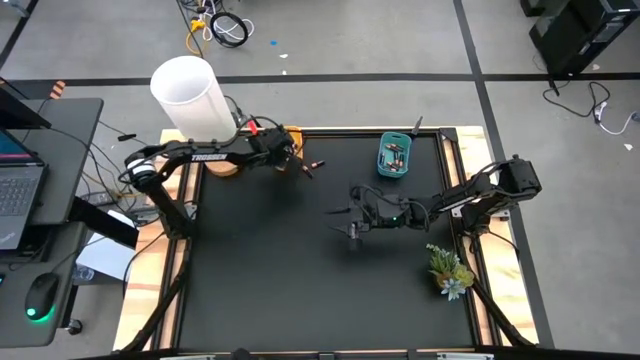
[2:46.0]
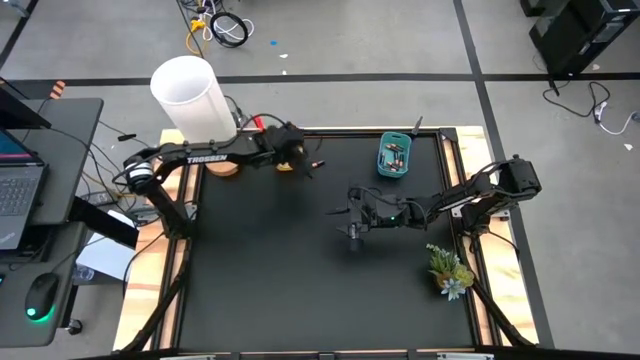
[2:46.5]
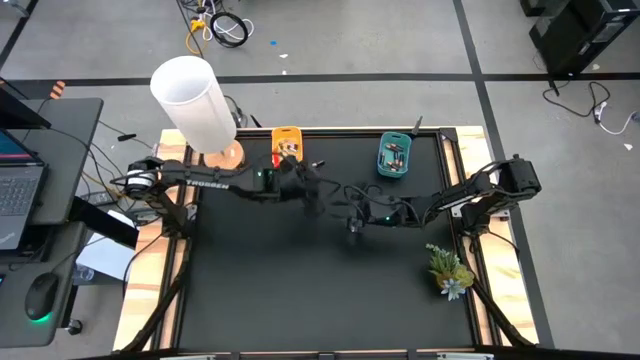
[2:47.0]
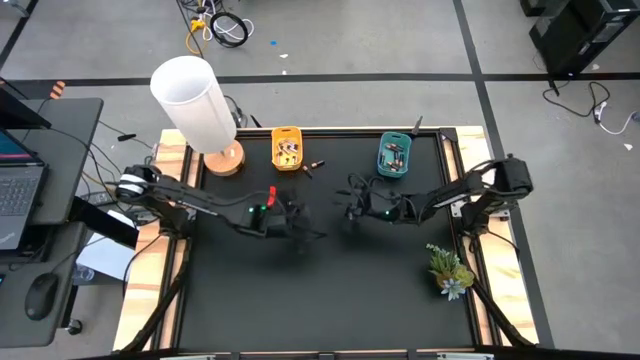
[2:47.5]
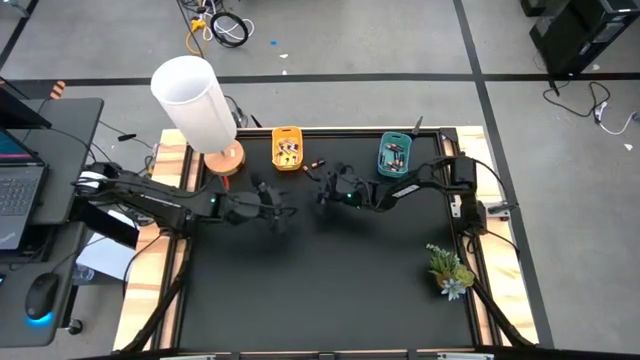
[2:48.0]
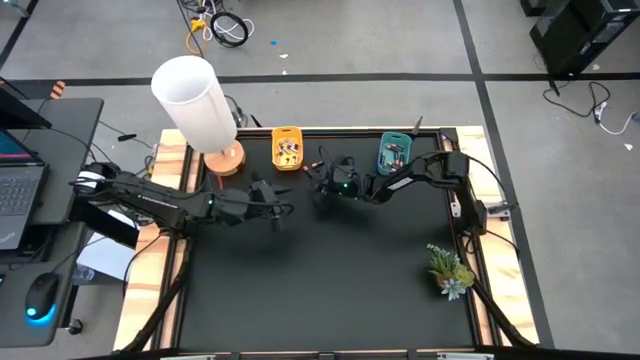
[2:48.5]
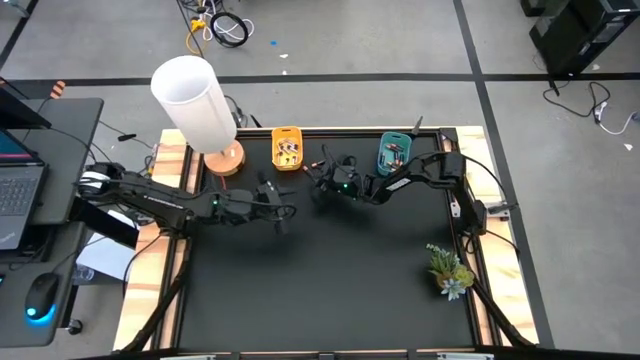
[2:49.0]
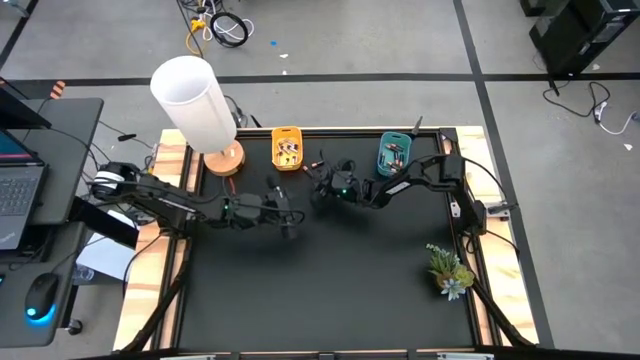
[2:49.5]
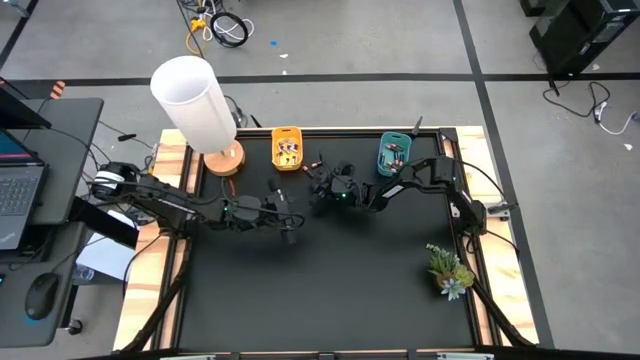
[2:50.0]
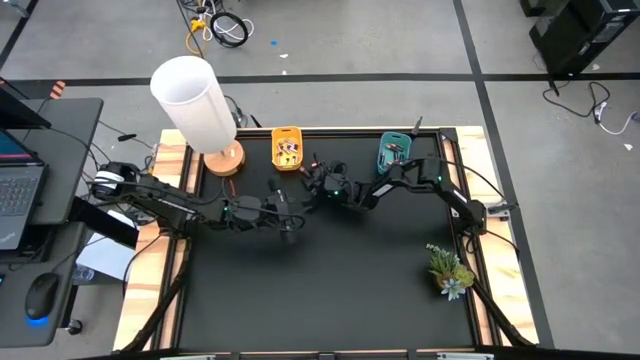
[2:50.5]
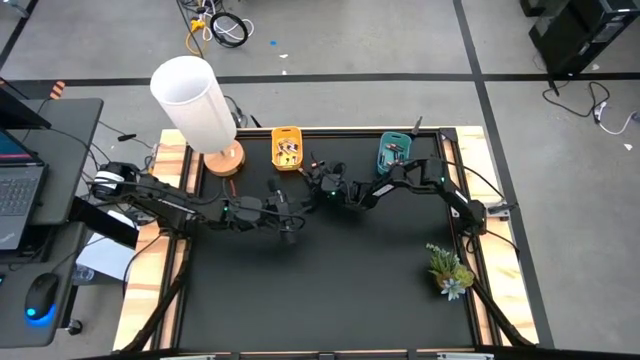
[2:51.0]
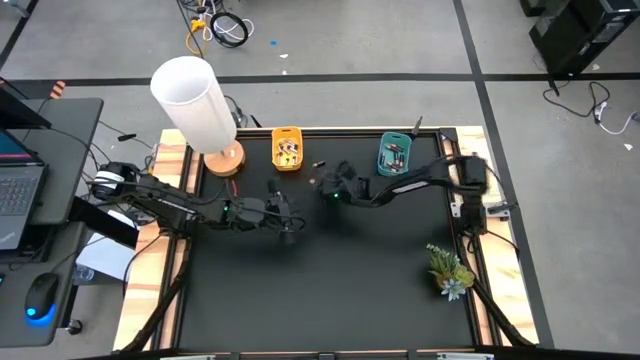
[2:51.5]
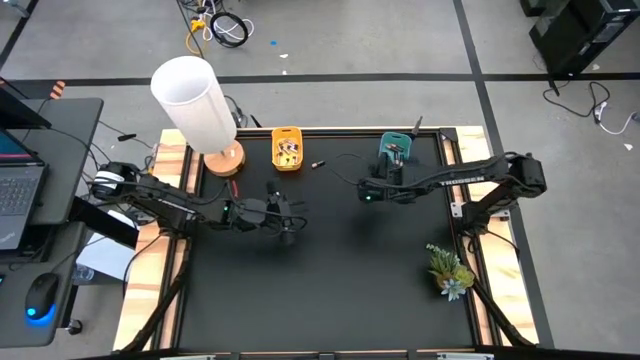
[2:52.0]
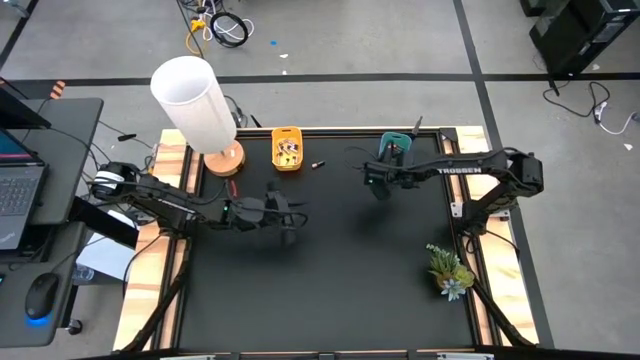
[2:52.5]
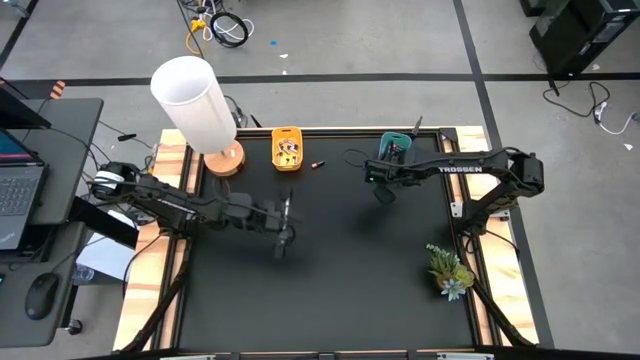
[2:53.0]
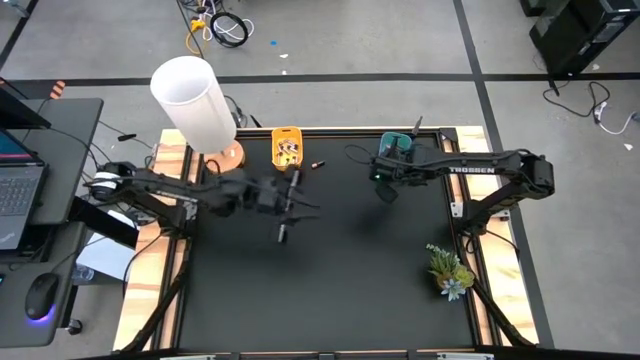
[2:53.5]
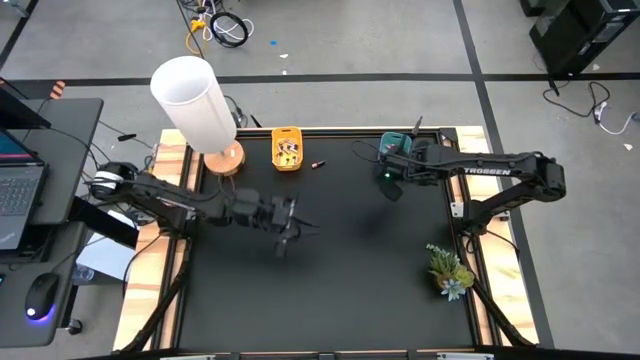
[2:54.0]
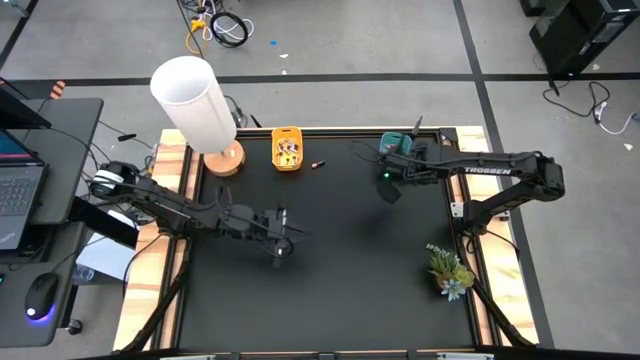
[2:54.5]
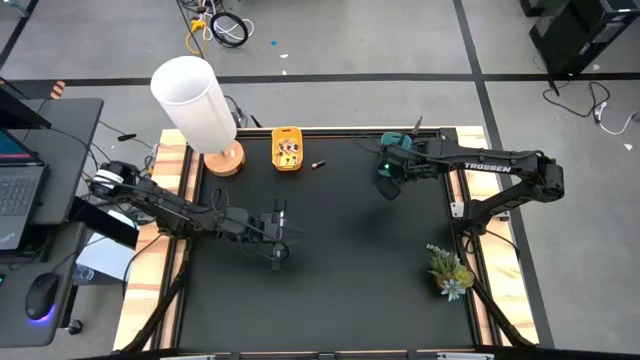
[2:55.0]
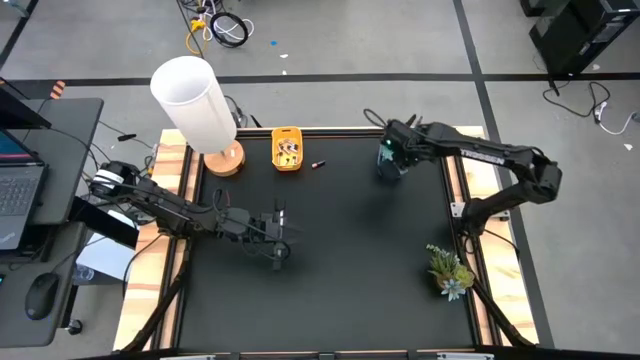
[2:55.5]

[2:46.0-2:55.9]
Task: Sort batteries
Put the black battery into the blue bin

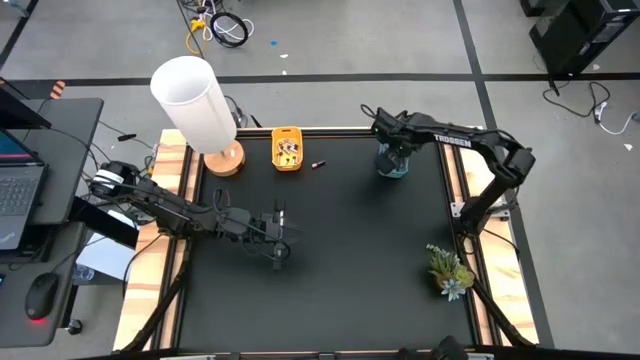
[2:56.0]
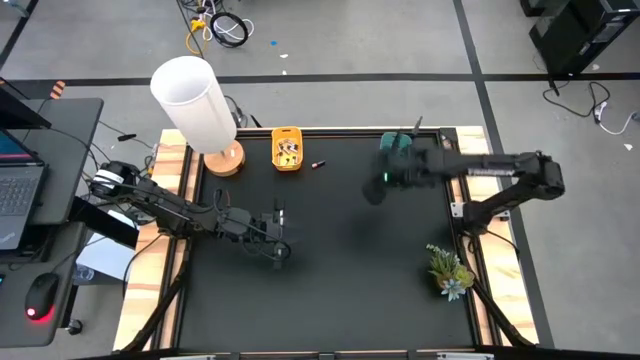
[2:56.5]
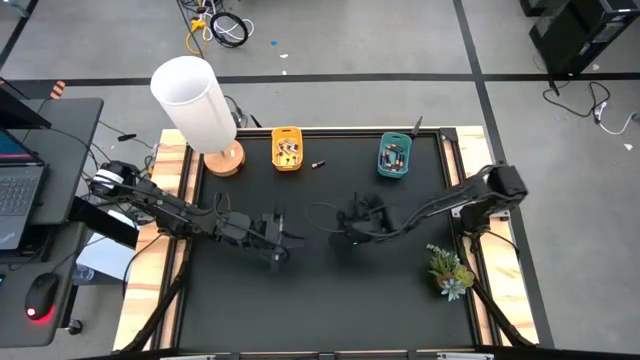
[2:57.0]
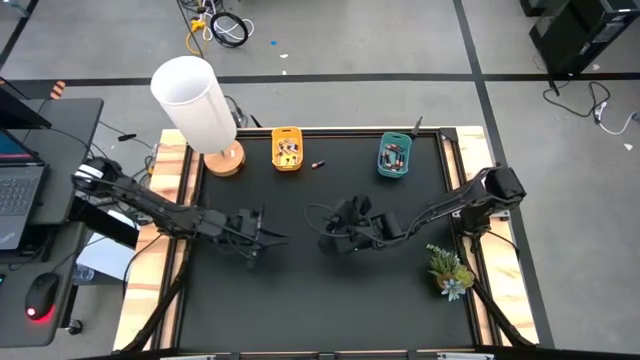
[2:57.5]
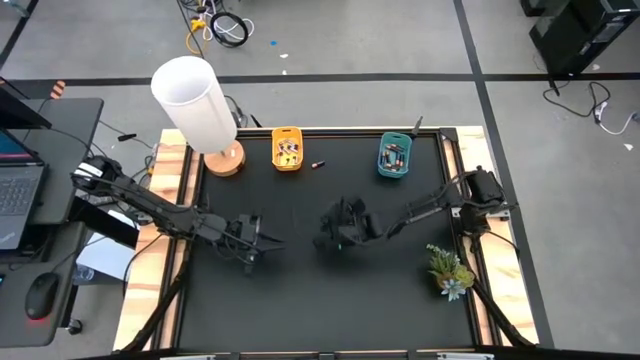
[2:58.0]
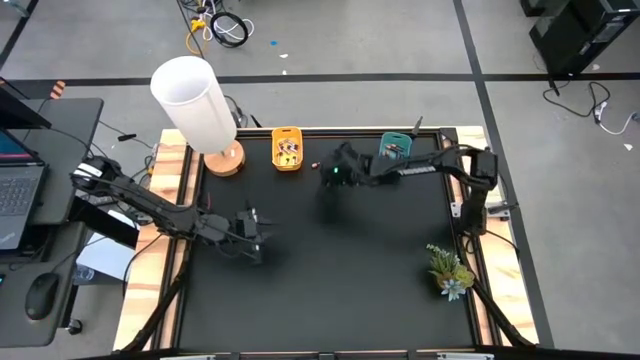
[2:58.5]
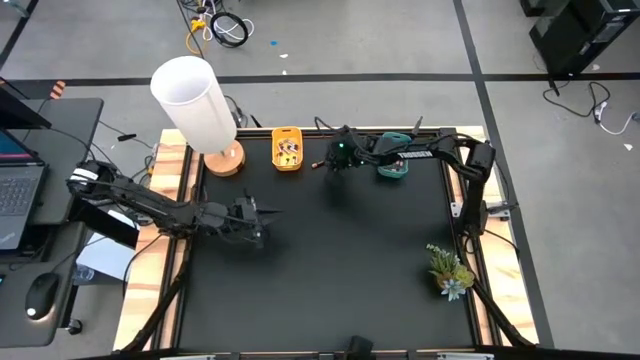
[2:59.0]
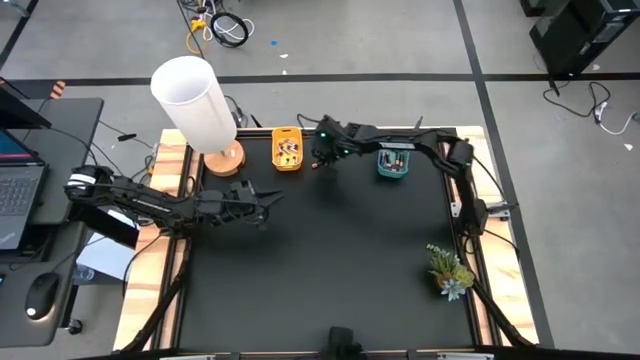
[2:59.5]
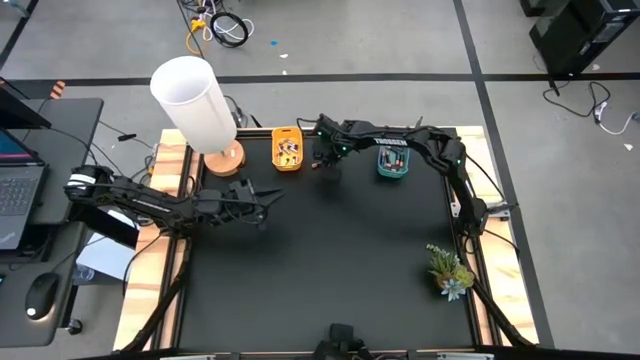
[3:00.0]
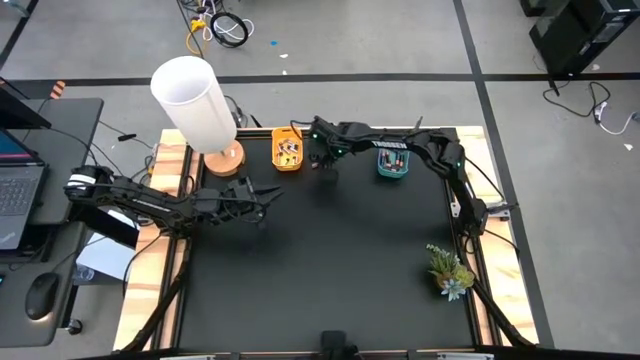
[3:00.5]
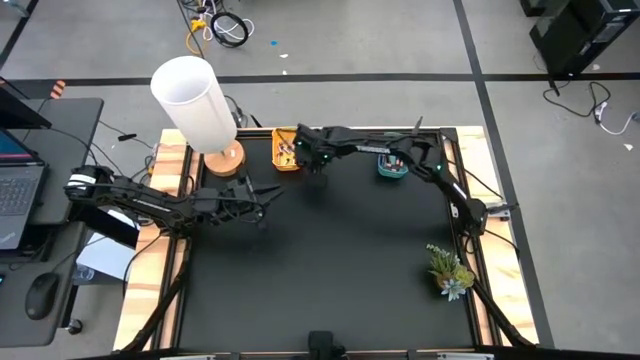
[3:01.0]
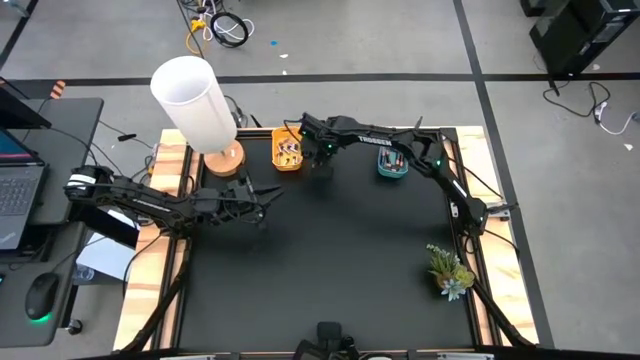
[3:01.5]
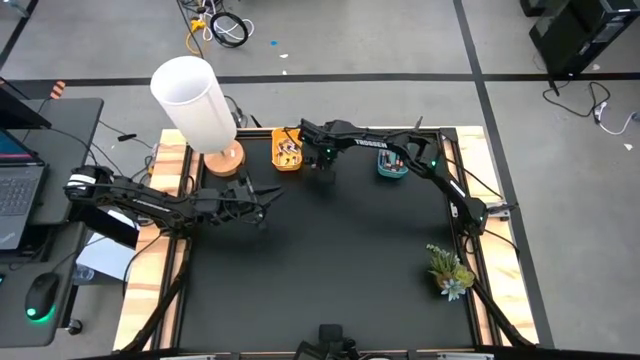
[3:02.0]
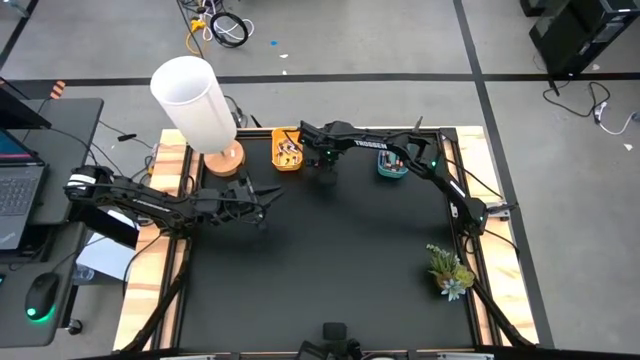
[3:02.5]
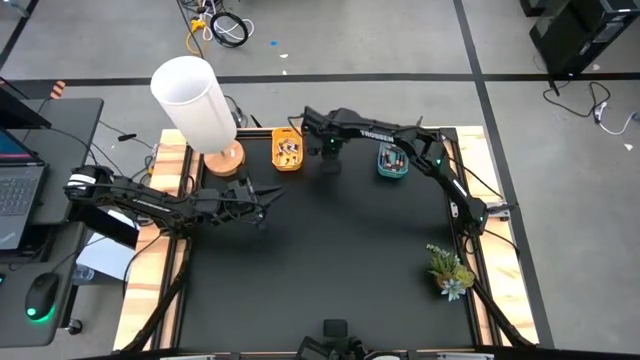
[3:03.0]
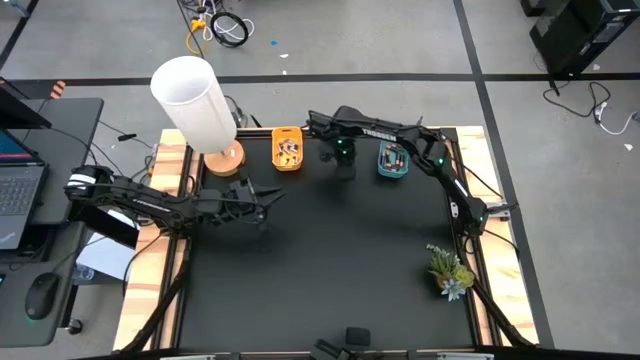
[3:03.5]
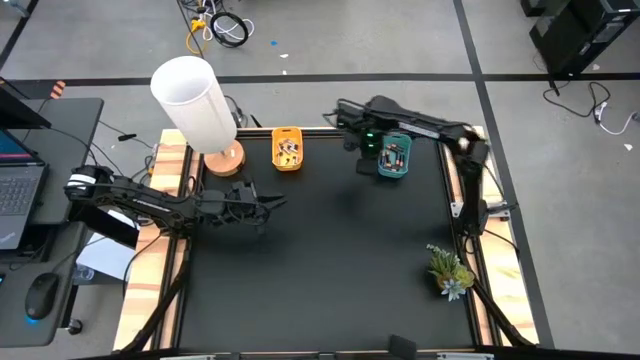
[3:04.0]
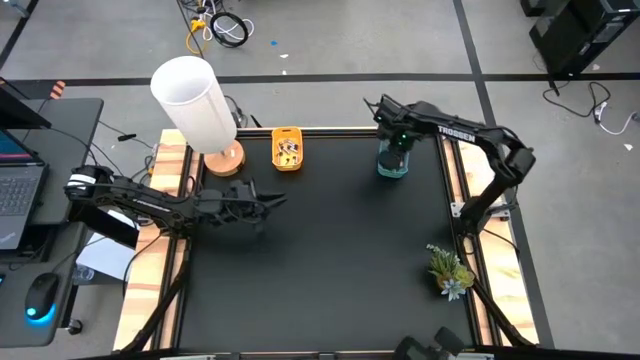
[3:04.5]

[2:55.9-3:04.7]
Put the black battery into the blue bin

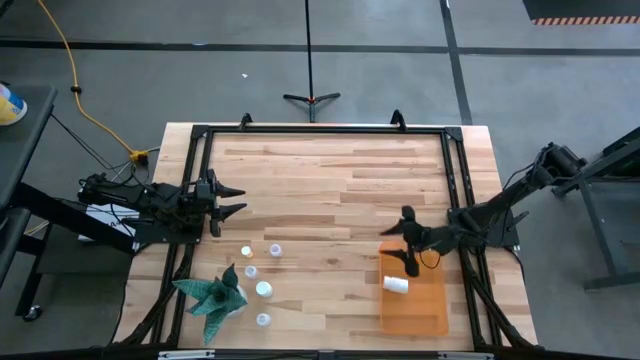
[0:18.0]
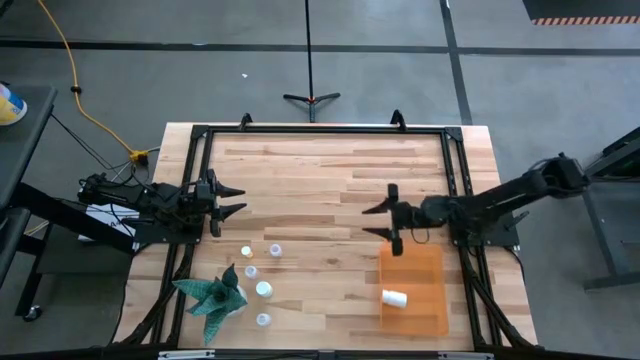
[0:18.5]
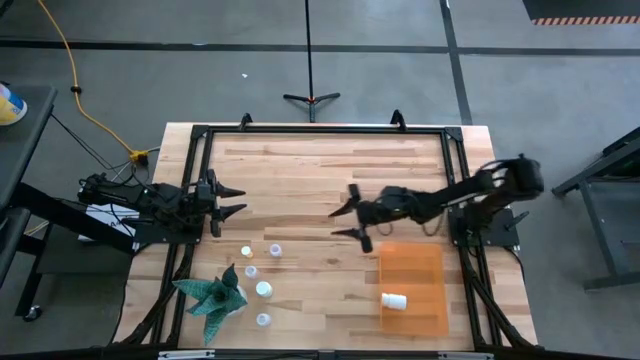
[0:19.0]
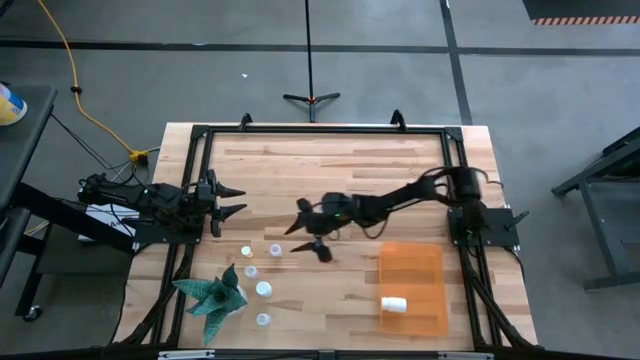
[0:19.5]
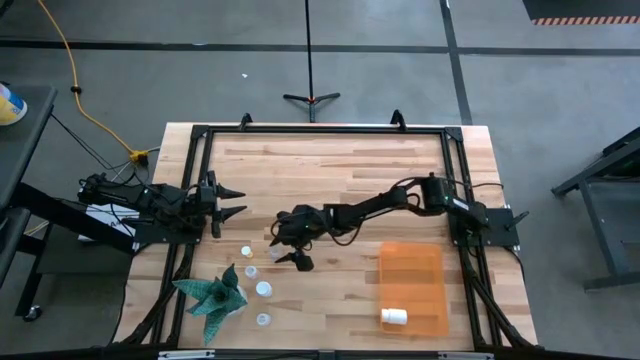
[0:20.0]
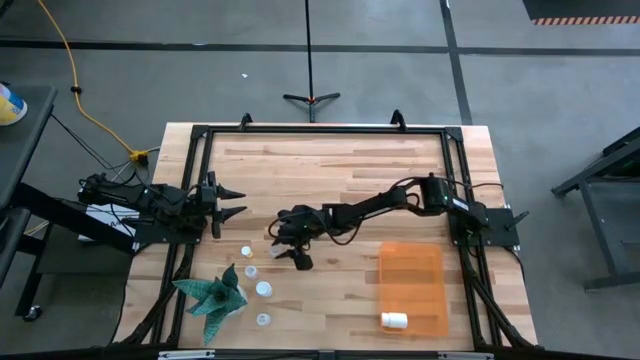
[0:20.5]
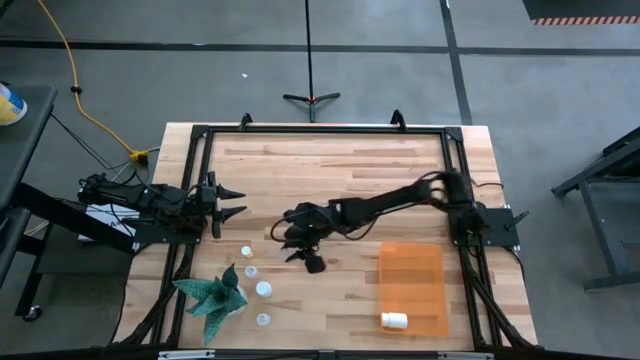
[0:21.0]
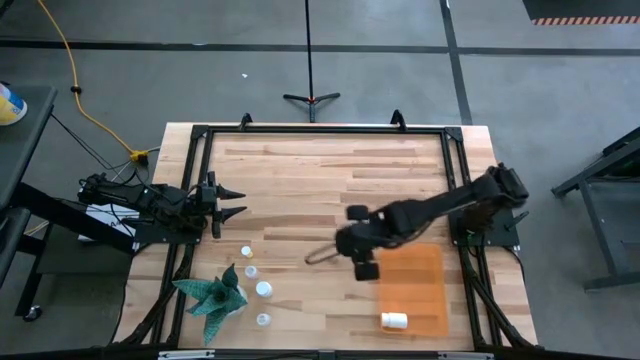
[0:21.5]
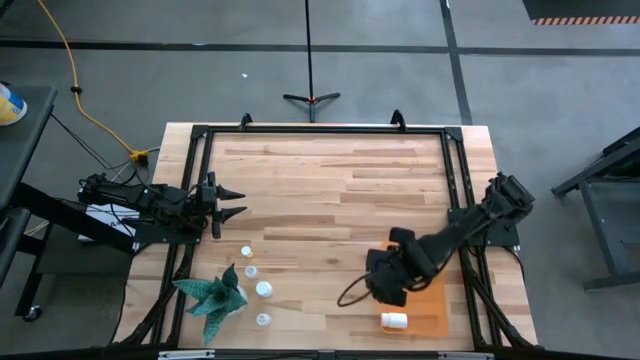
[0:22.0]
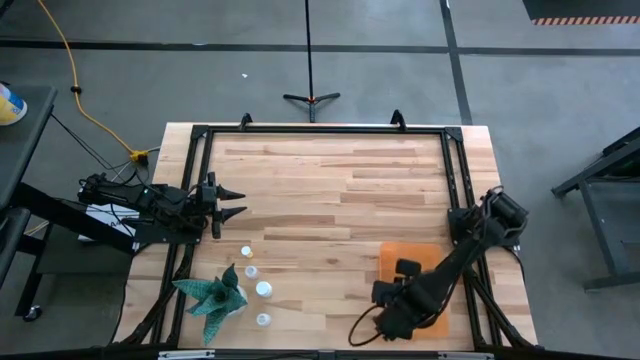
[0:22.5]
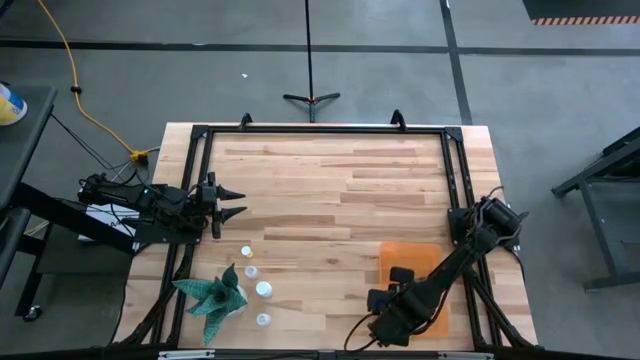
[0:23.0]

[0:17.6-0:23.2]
Task: Pick and place pill bottles into a basket
Put the top right transparent medicine bottle into the orange bin
